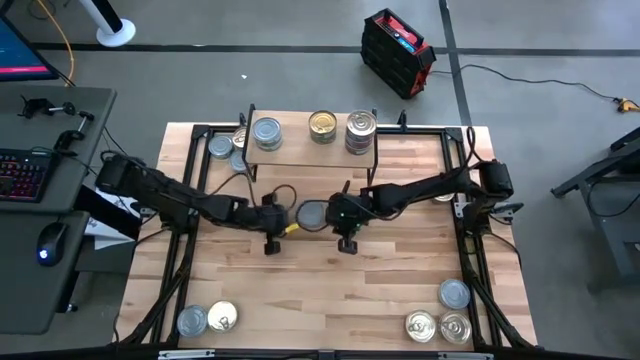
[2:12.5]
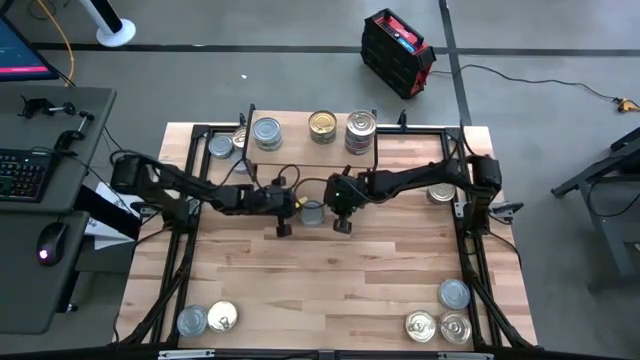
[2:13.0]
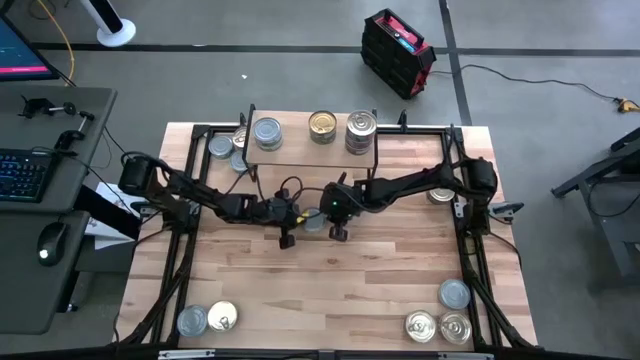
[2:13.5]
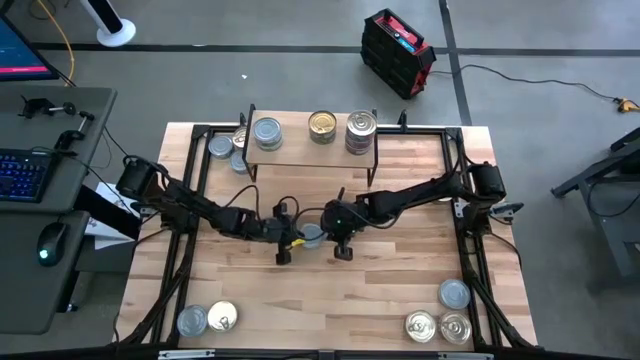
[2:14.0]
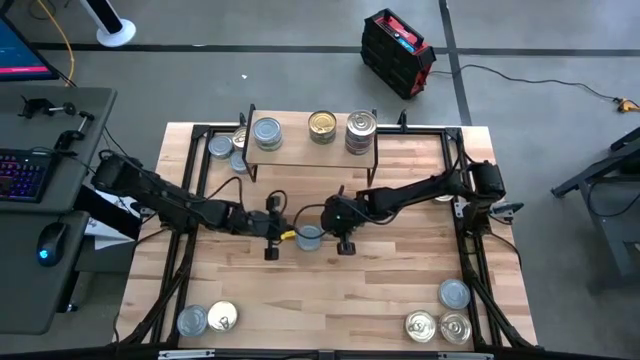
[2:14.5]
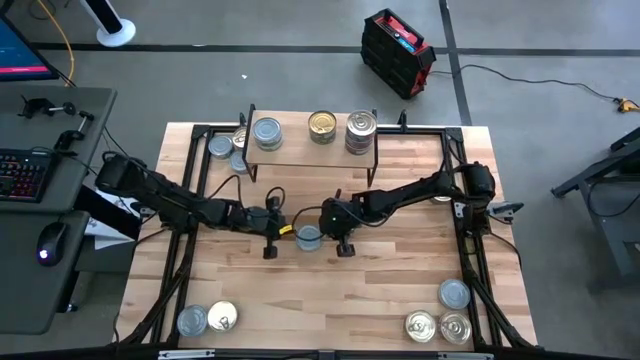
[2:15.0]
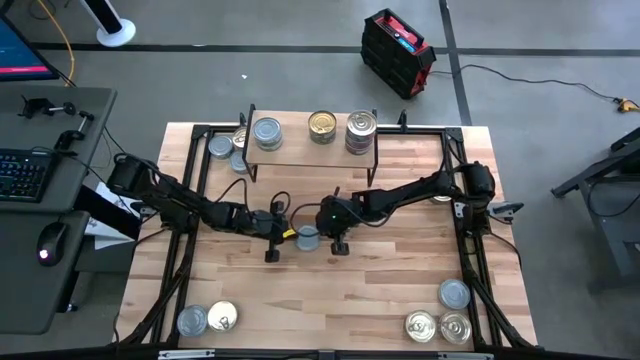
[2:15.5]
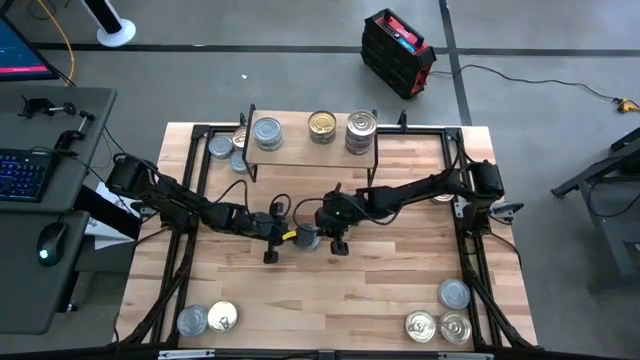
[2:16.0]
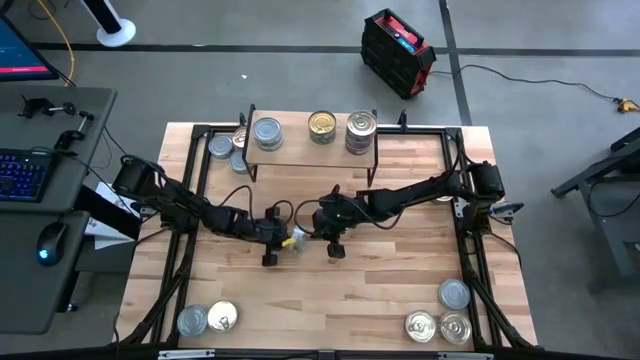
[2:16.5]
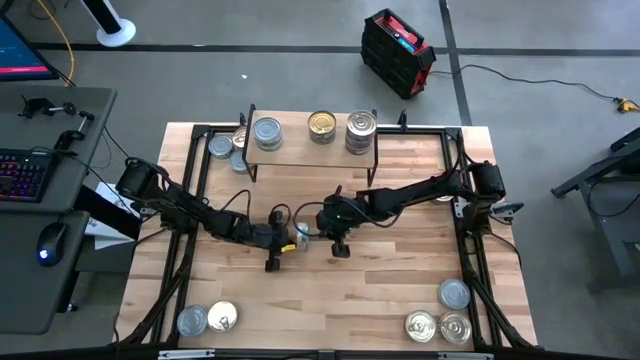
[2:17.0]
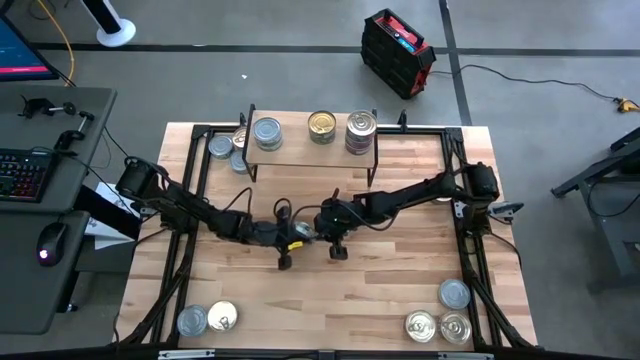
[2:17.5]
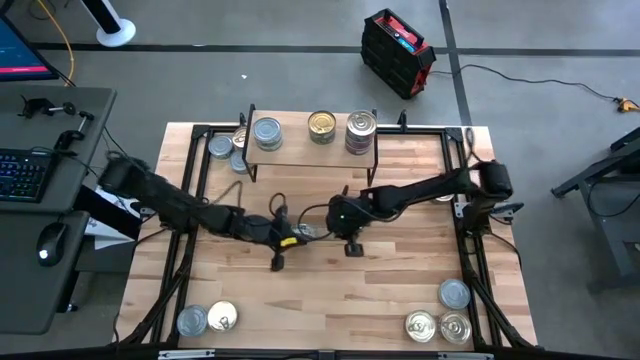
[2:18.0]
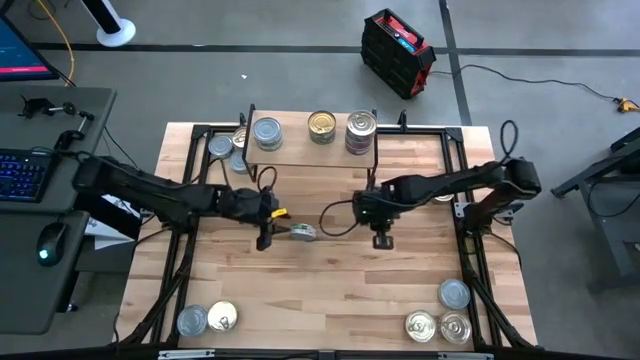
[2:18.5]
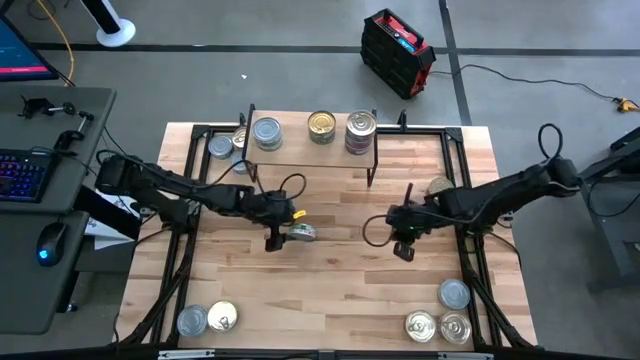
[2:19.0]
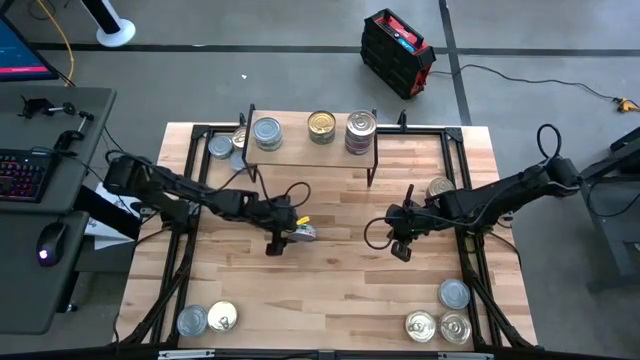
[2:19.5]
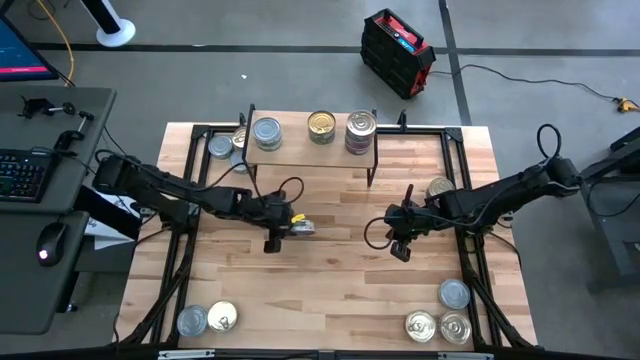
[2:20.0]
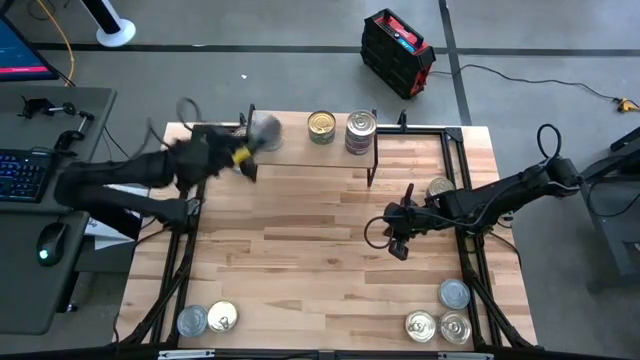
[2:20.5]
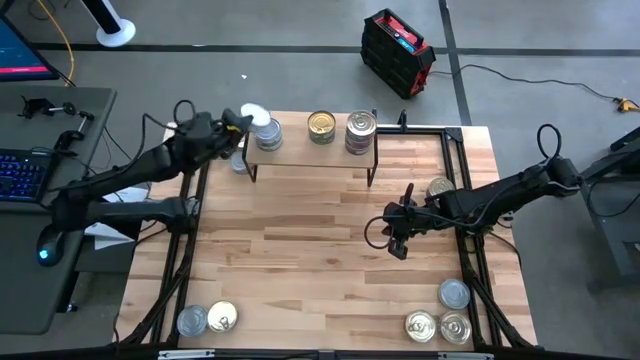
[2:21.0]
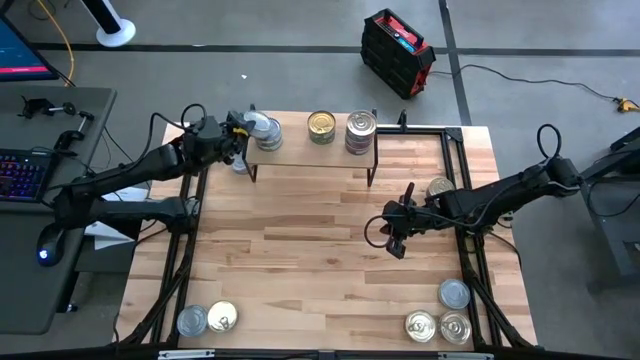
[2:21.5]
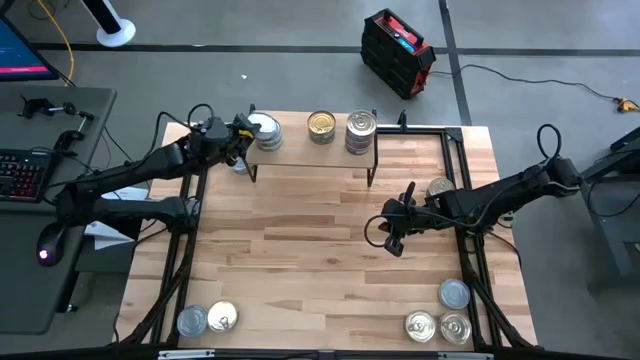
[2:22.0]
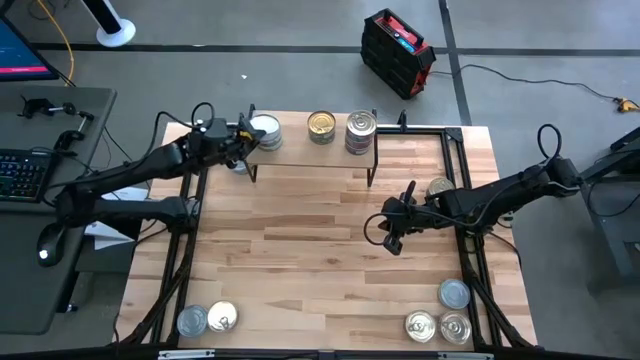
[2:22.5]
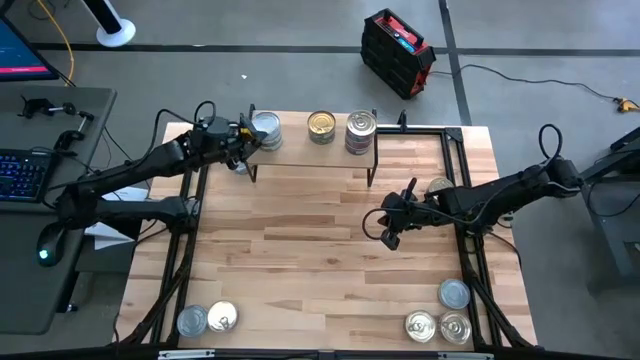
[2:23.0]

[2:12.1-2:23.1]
Task: Stack canned seafood by type on shelf
Stack the green white tuna can on top of the other green white tuna cans on the shelf

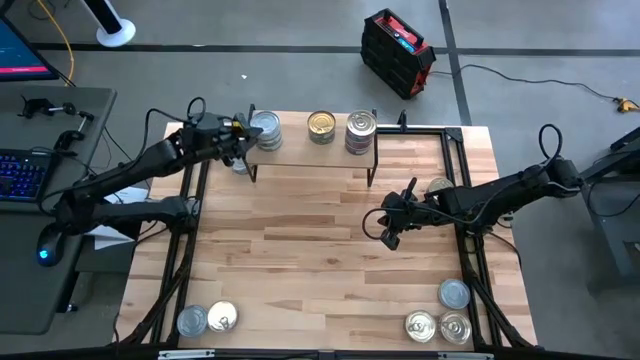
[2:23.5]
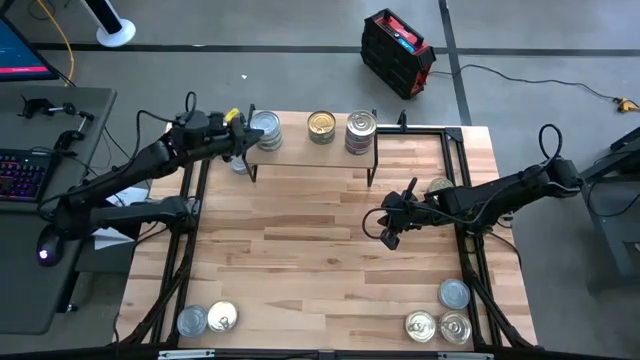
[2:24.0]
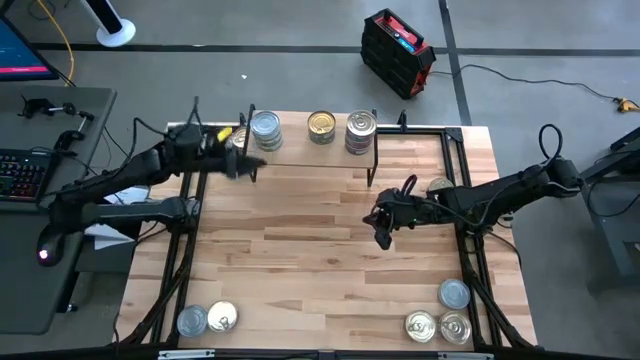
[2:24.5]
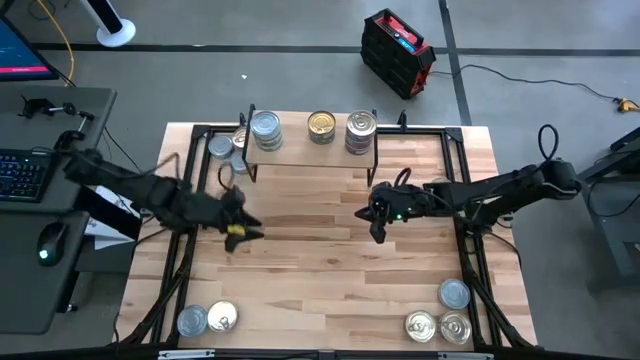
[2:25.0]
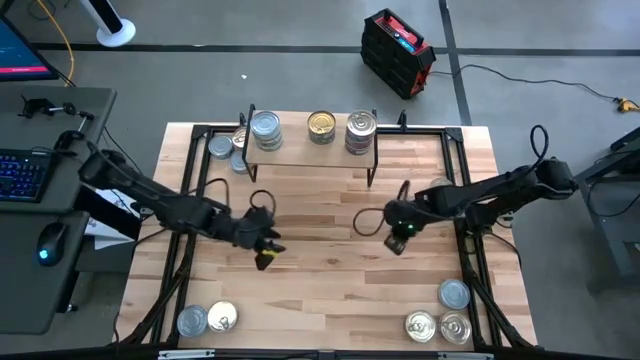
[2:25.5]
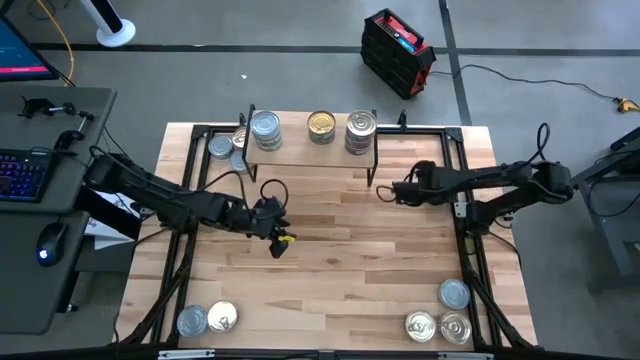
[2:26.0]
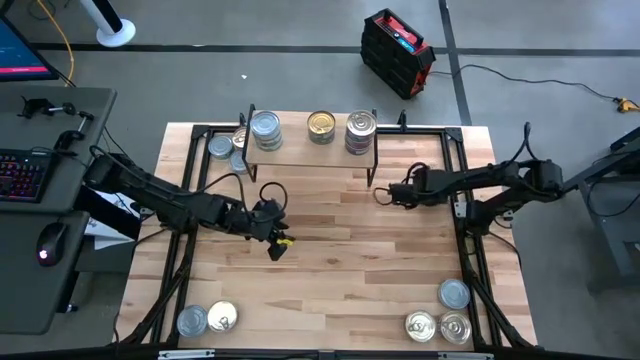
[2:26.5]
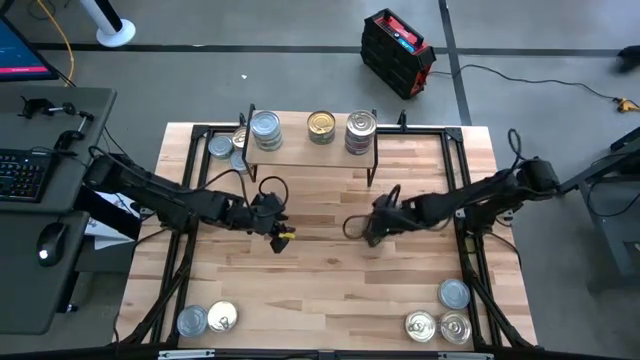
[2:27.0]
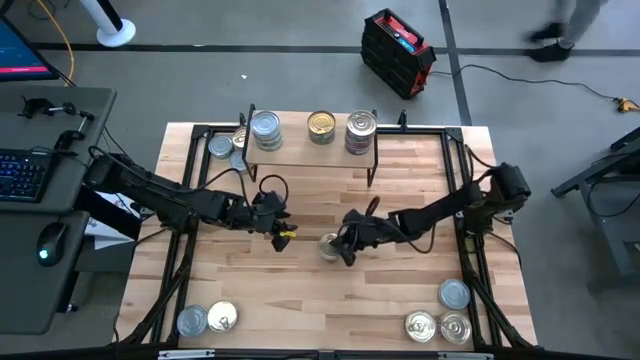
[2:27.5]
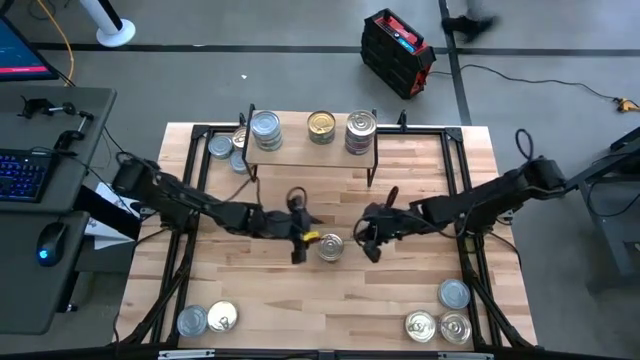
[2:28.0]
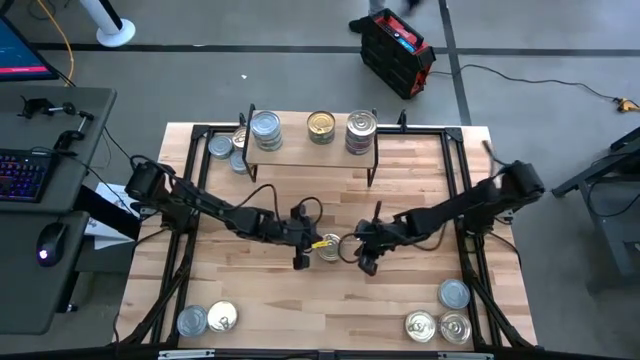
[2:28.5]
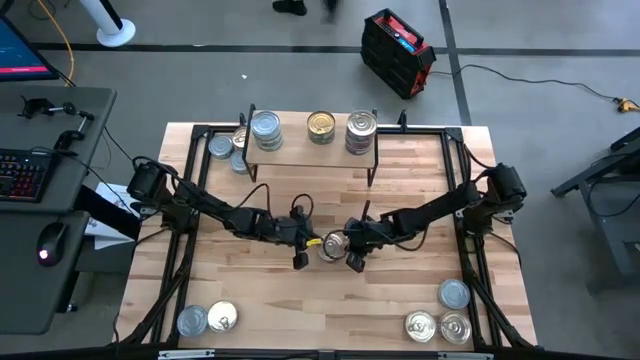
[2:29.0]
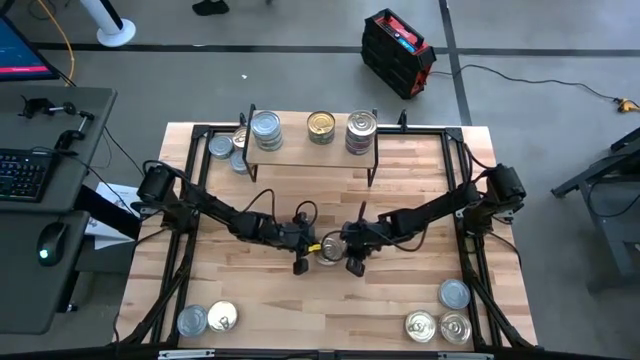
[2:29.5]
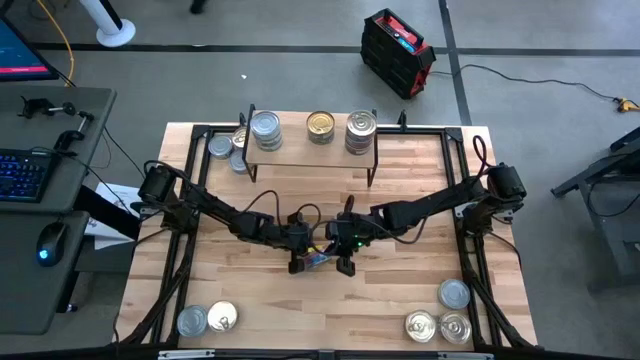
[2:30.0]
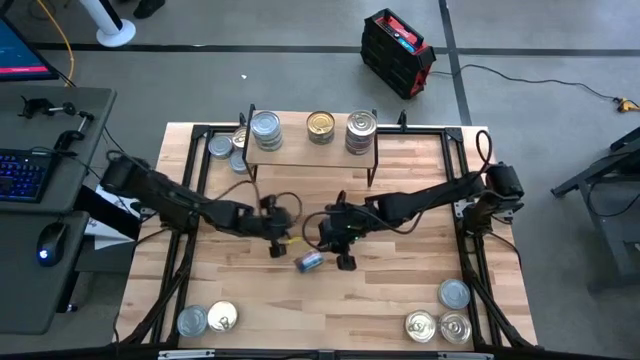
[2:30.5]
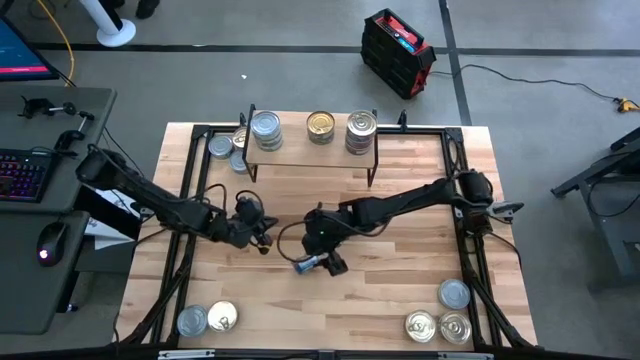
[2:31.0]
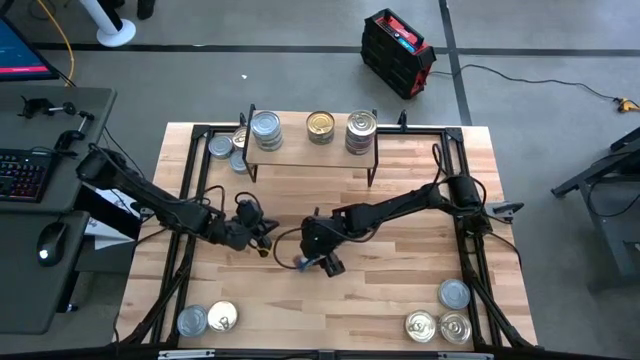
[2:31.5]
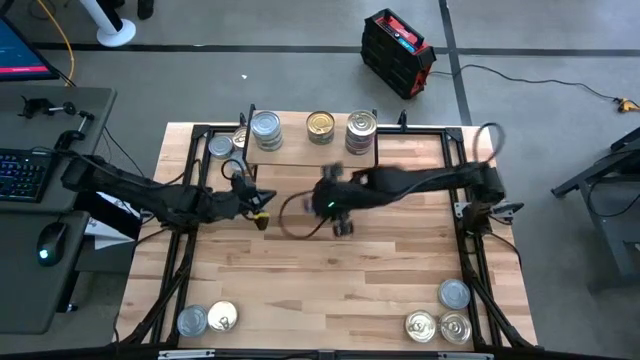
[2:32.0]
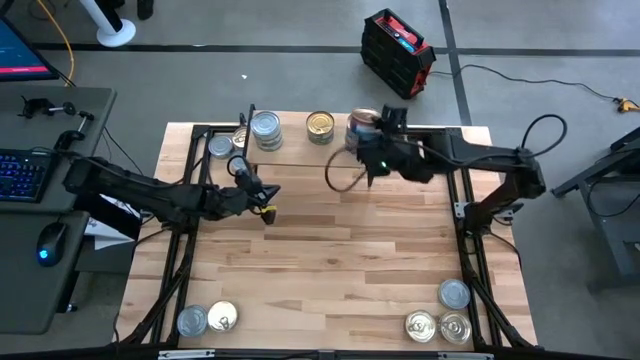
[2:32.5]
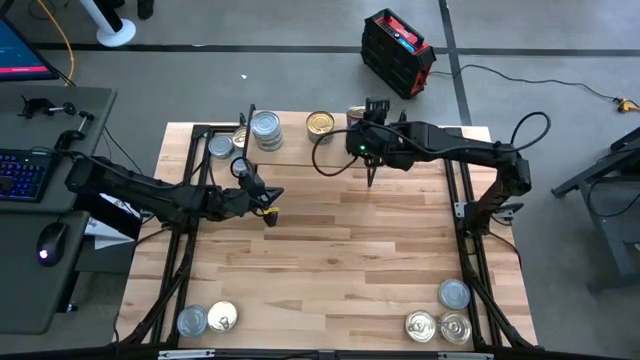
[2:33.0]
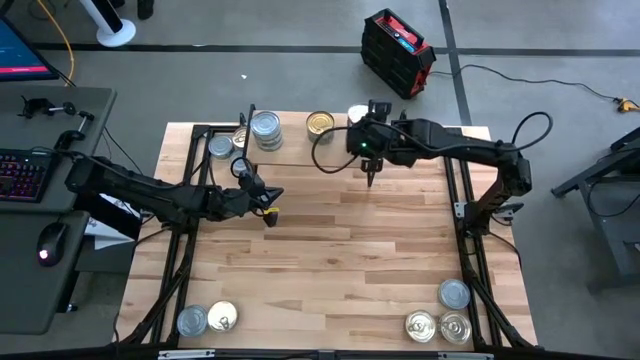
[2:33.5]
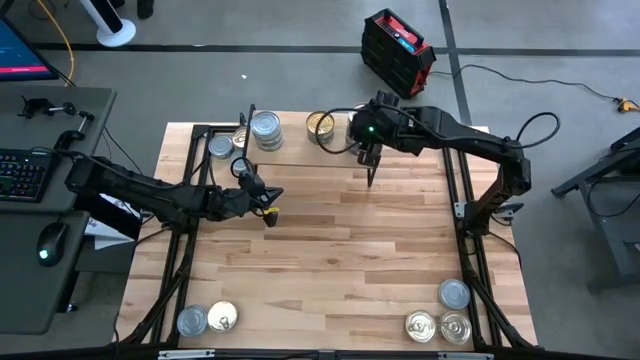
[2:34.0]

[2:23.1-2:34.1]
Stack the blue pink tuna can on top of the other blue pink tuna cans on the shelf
